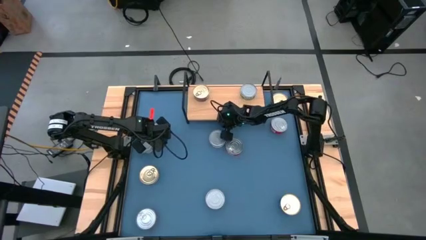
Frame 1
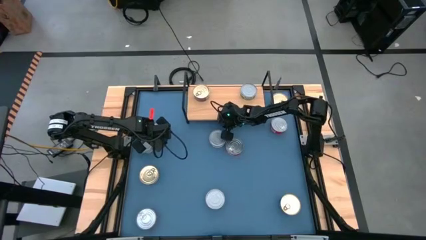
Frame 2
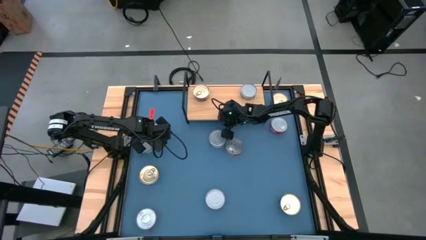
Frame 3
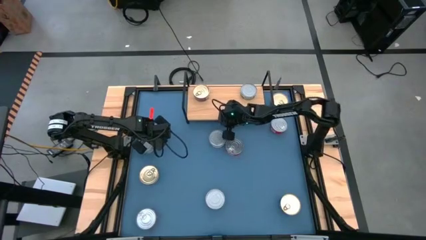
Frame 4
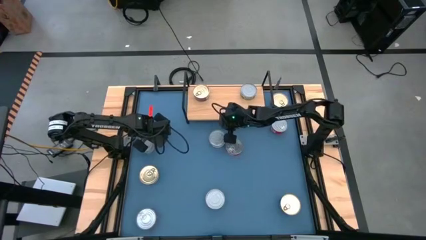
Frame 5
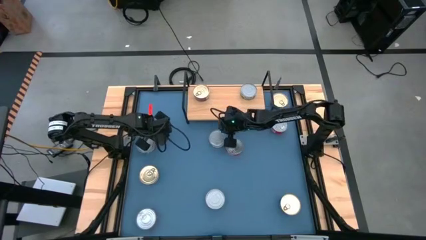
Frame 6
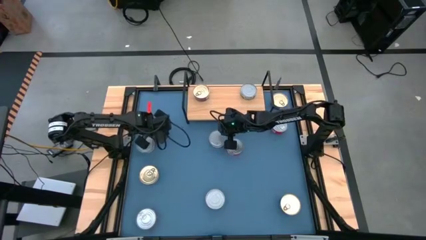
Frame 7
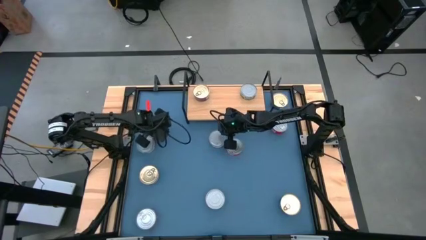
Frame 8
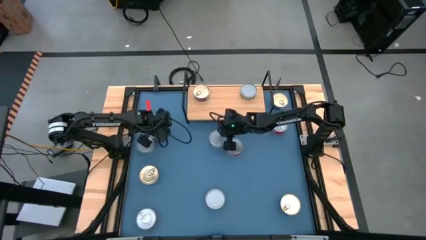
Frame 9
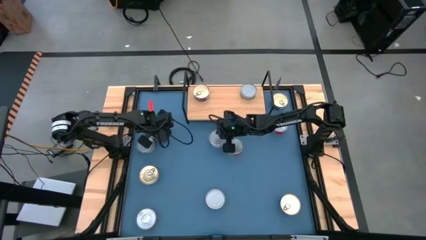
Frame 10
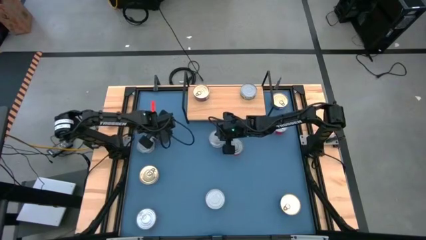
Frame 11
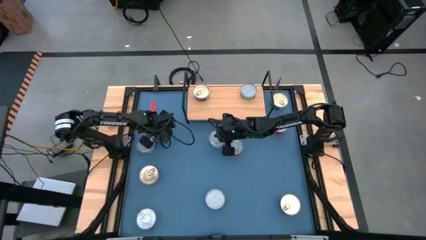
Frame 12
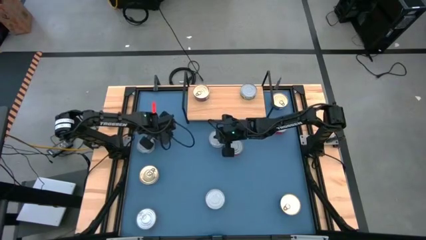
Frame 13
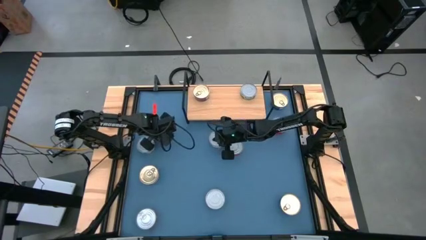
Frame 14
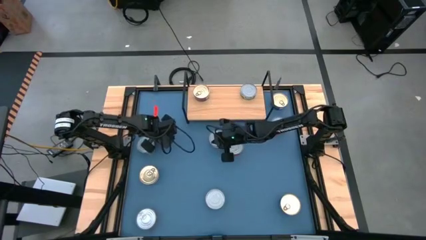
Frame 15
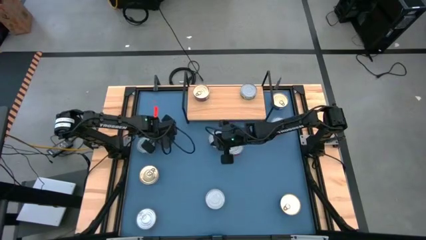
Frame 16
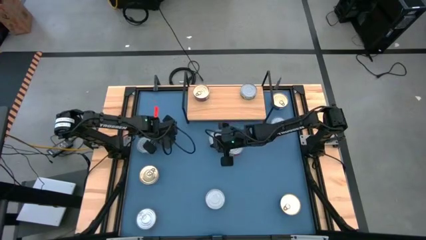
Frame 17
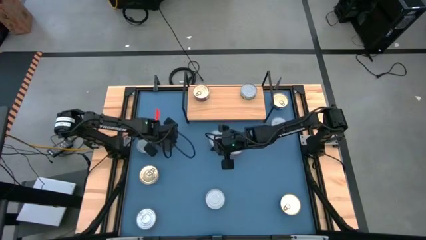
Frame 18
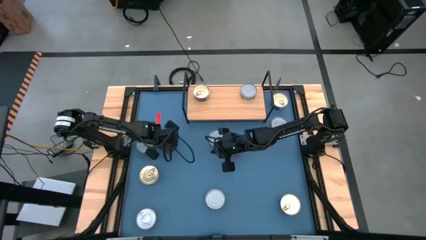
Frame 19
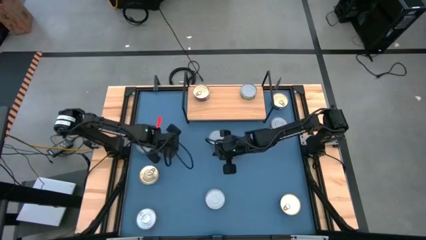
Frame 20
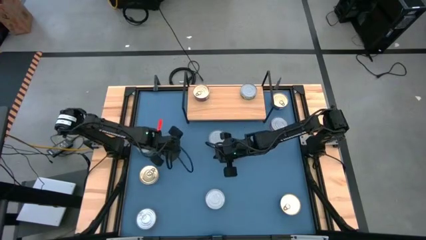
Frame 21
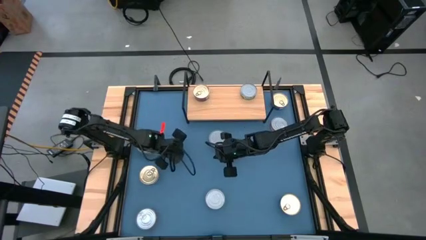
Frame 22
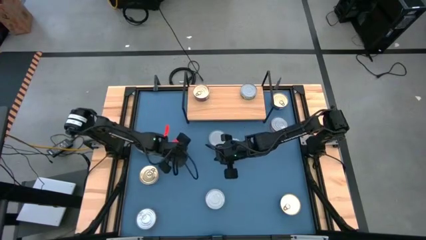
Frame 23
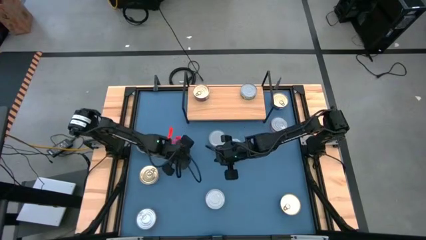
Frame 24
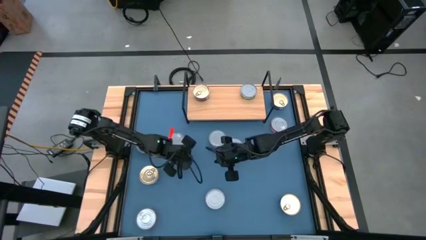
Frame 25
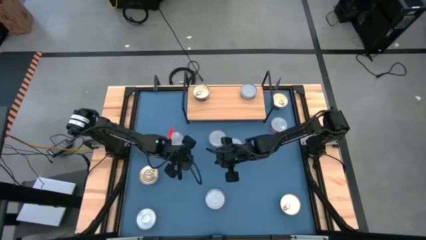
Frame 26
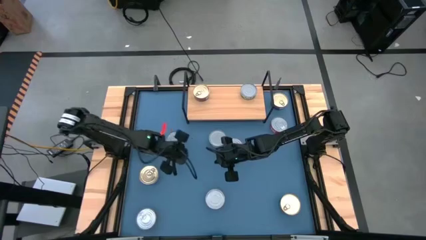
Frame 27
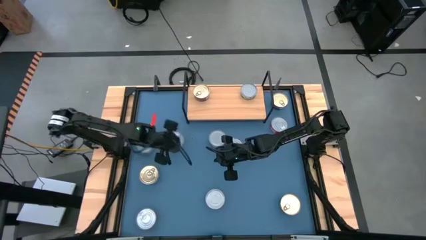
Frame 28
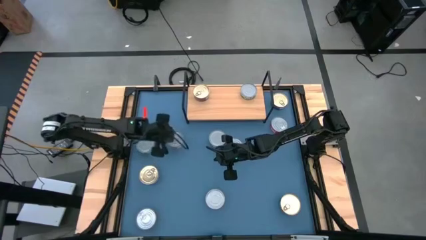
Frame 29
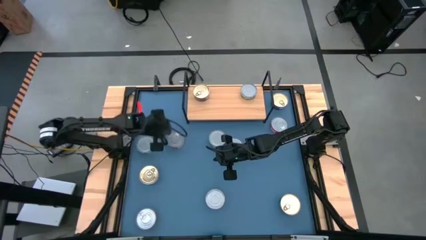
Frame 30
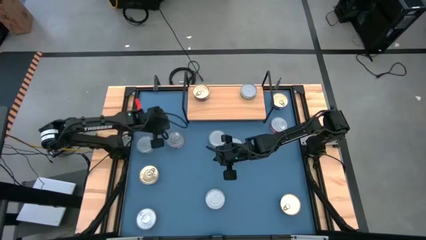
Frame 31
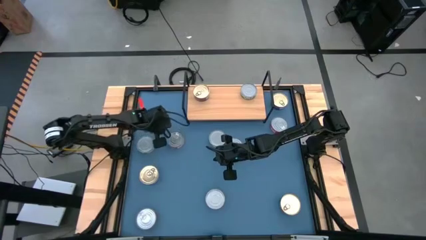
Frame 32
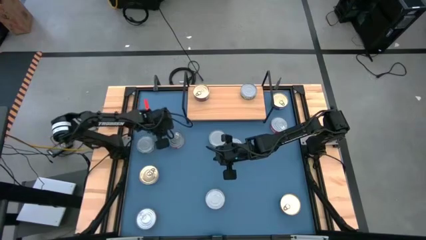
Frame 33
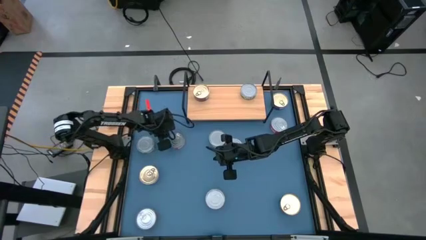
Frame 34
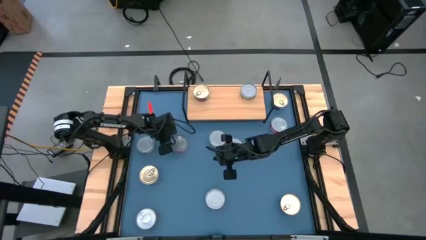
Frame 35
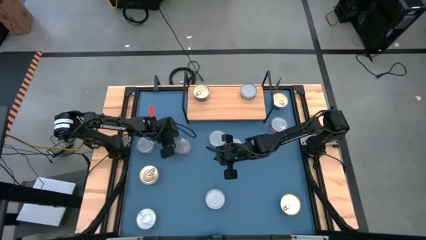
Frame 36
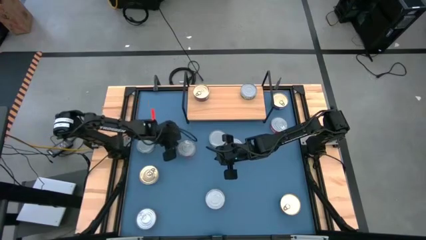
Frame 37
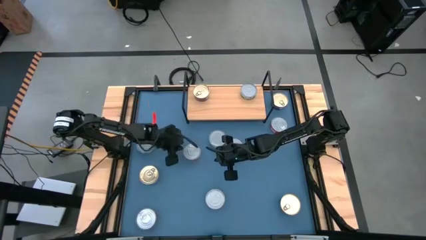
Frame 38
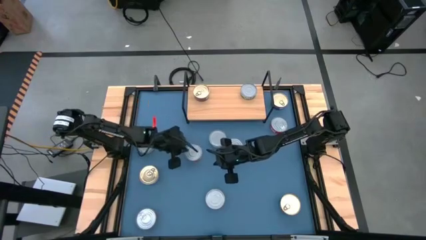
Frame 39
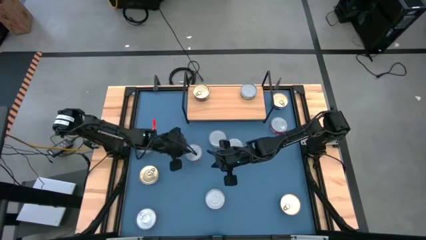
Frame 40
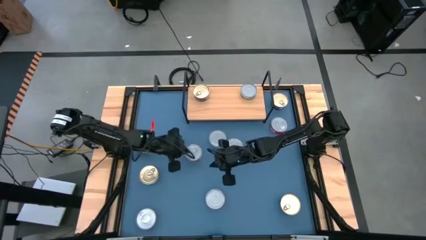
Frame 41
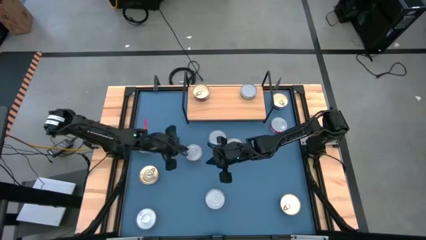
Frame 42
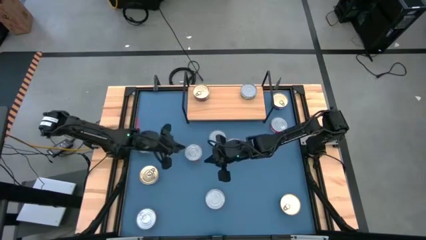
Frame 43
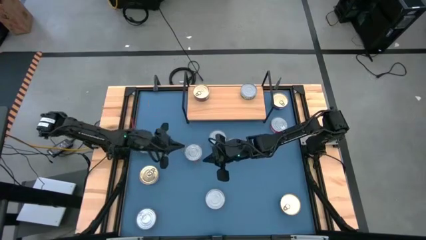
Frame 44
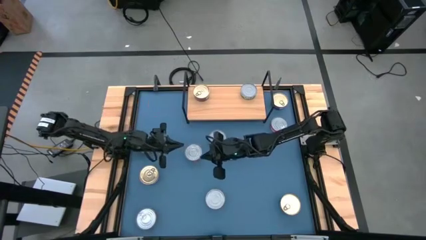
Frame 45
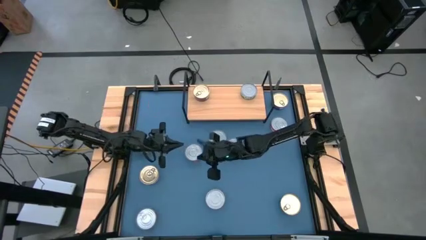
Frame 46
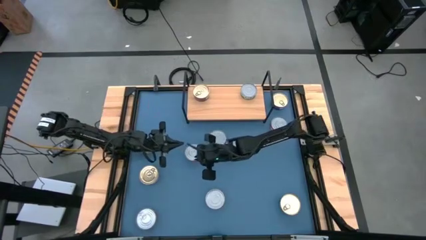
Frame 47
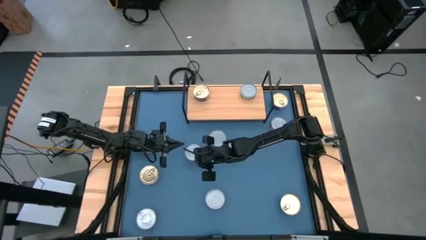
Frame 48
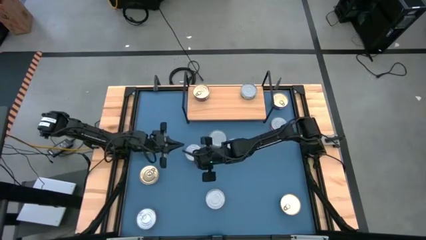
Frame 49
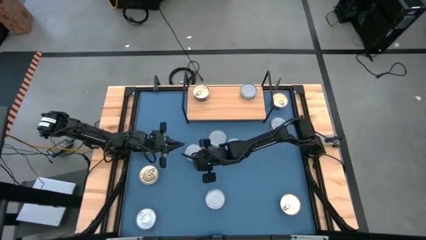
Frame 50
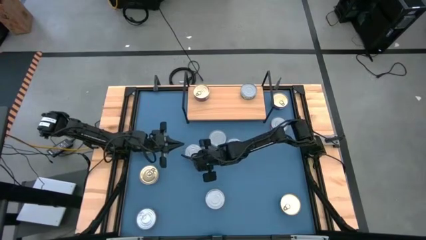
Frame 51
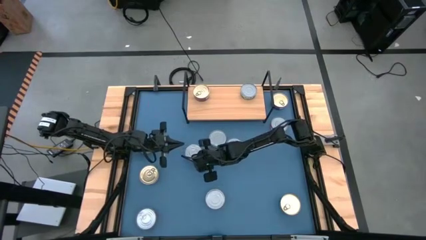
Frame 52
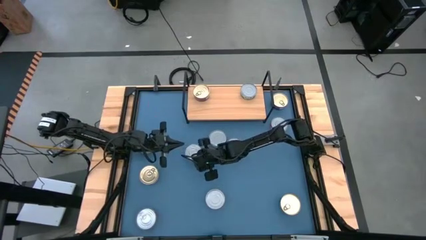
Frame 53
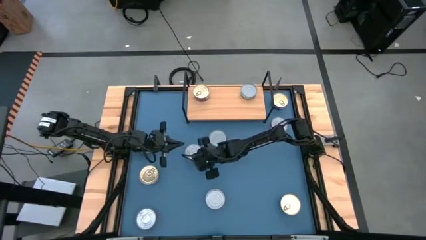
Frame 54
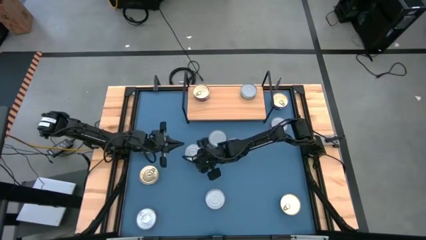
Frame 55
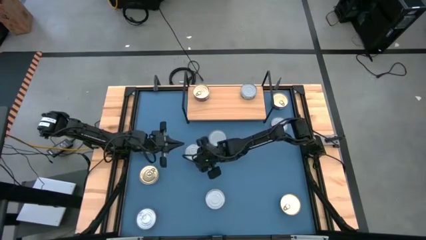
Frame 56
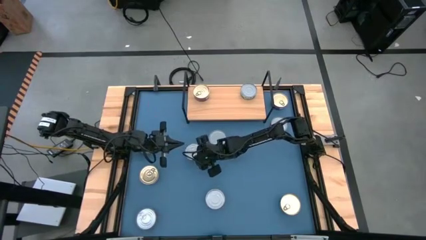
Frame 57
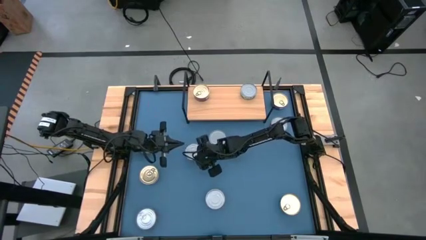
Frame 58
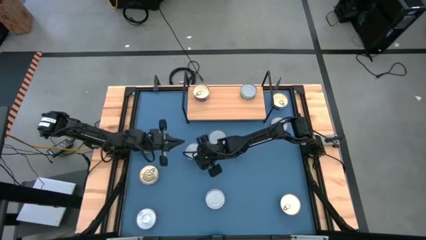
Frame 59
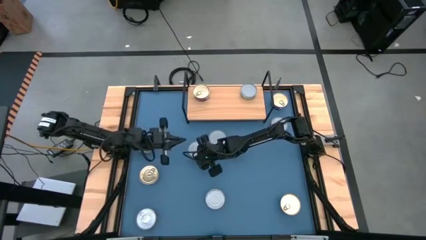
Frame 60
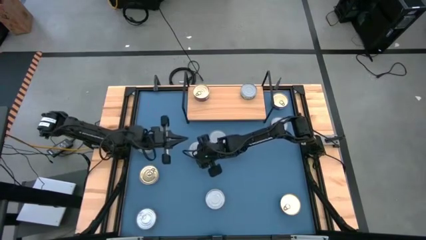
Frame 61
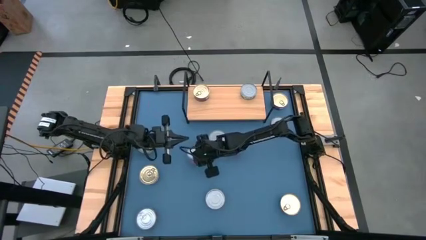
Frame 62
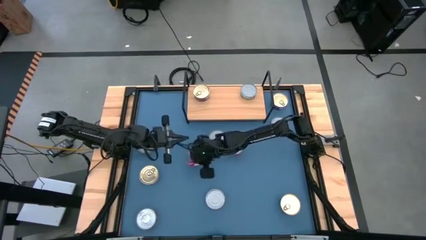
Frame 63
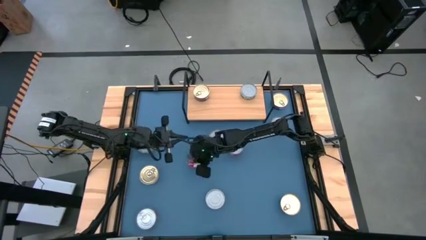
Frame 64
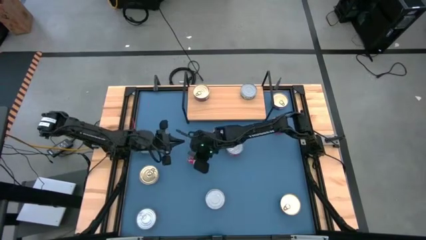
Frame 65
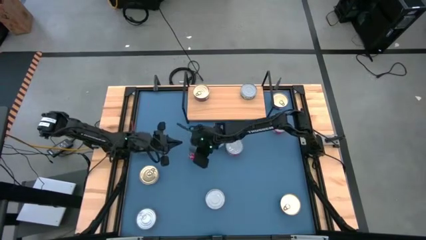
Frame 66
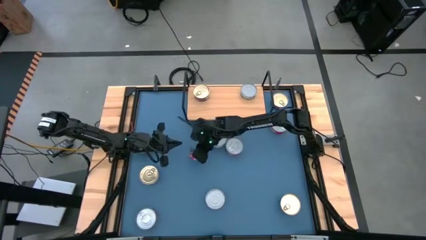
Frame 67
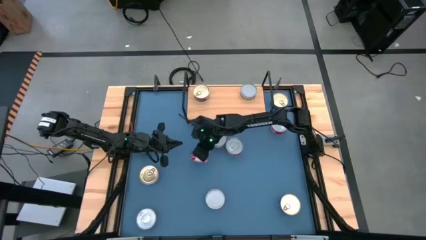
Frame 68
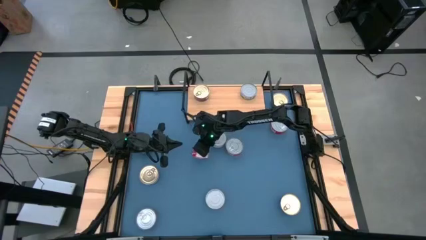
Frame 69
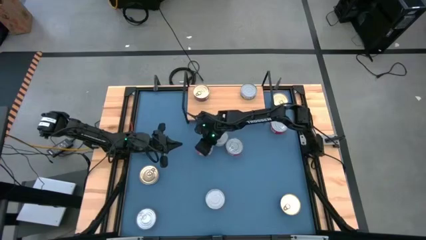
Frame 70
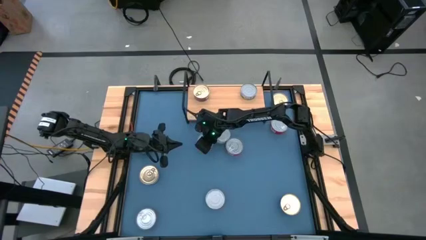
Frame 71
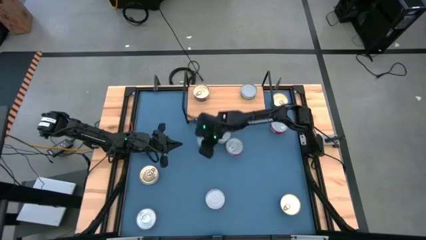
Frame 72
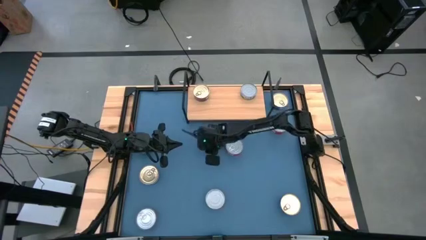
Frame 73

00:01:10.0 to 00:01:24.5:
Task: Stack canned seafood by type on shelf
Put the red tuna can on the shelf

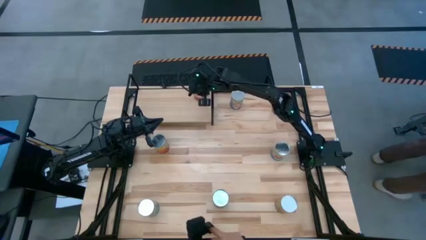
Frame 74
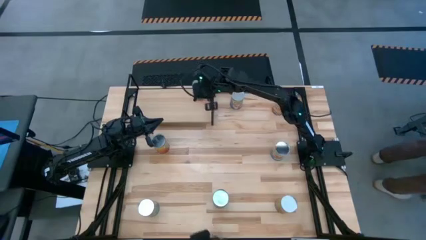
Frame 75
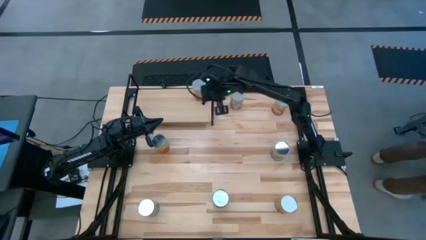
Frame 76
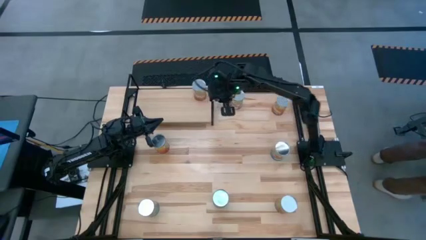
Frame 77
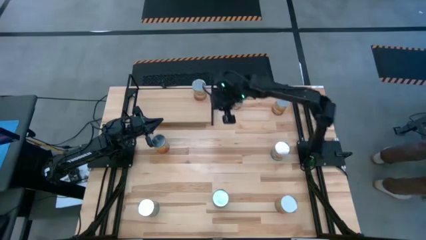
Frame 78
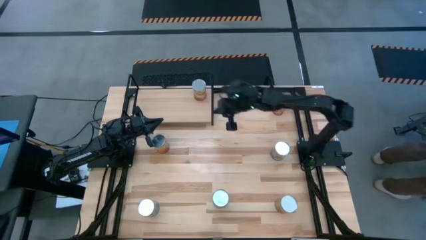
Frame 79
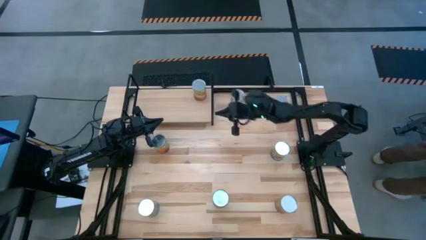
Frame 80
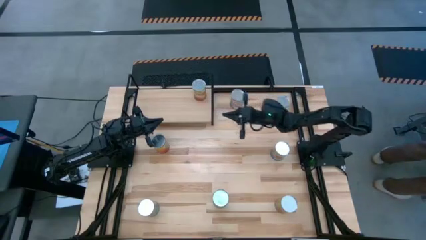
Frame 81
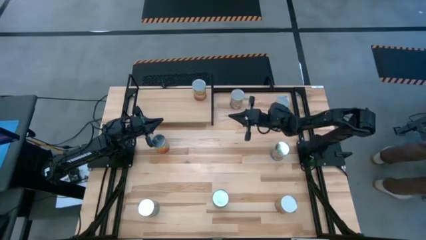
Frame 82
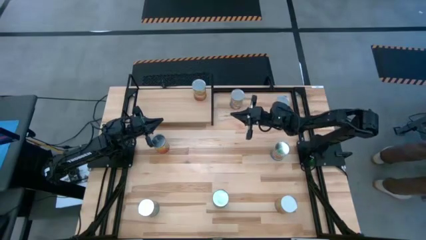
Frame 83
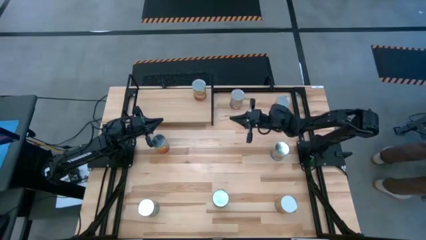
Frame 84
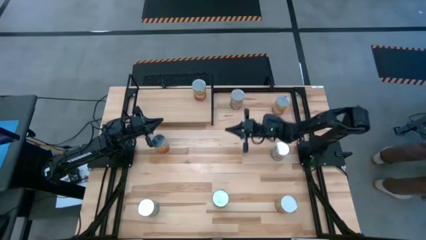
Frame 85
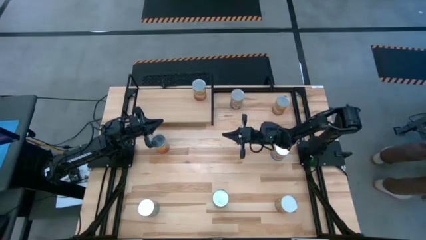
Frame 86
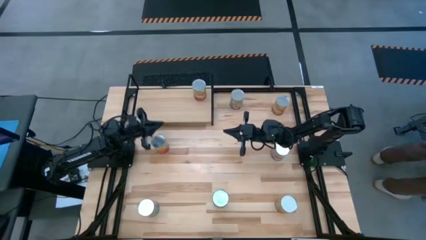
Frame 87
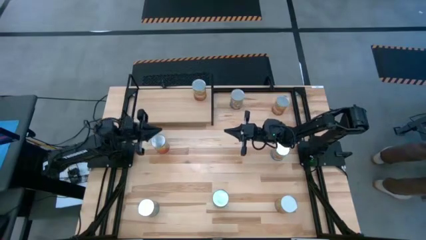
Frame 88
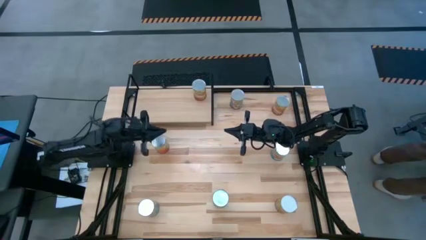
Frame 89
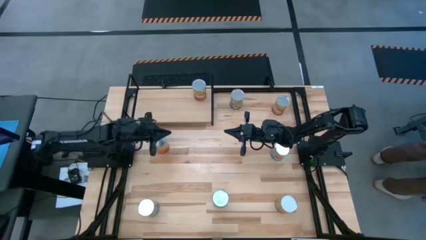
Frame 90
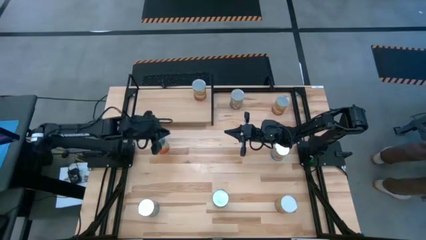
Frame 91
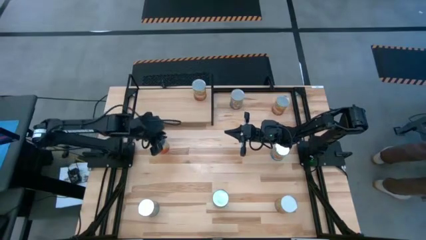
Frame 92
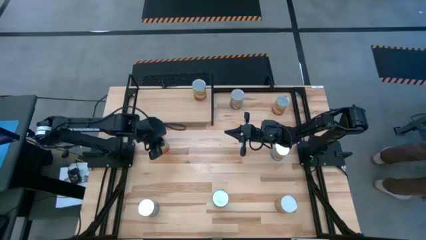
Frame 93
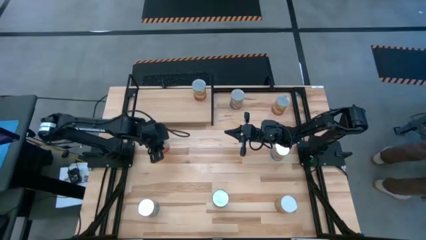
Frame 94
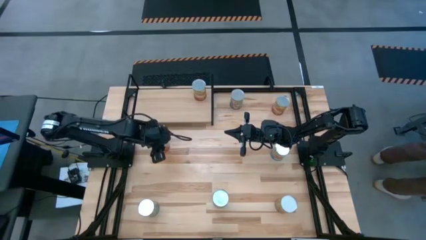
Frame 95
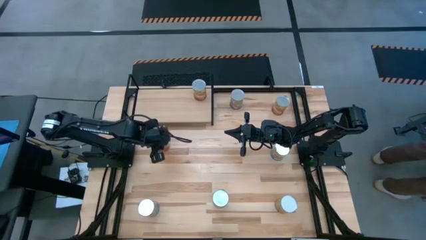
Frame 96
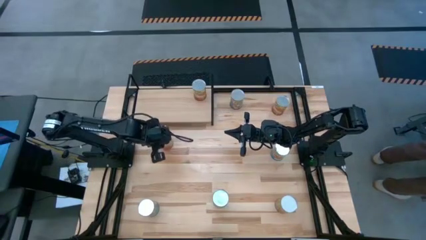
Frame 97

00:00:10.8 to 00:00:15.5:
Task: Pick and place cans onto a shelf
Put the left canned green beans on the shelf
